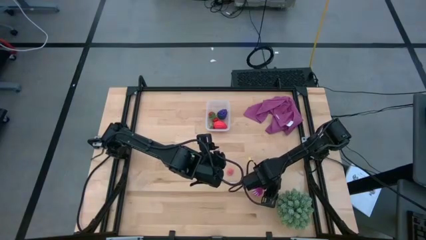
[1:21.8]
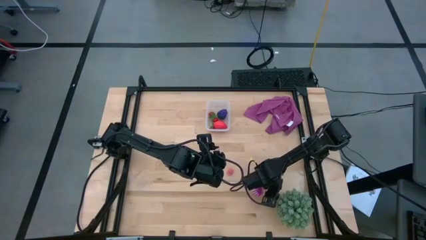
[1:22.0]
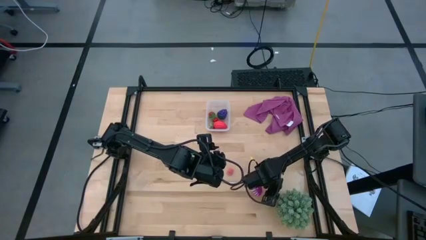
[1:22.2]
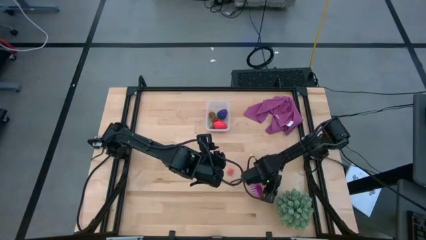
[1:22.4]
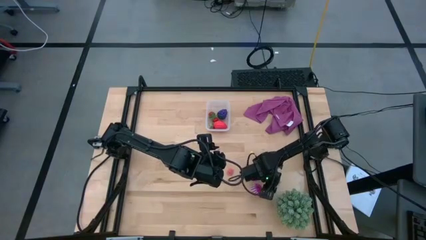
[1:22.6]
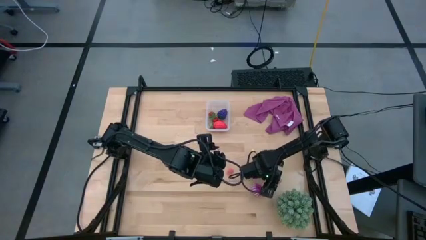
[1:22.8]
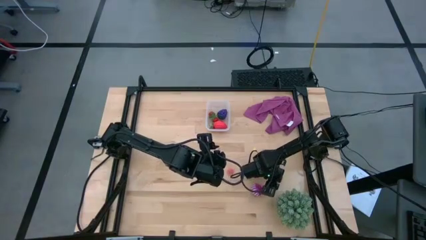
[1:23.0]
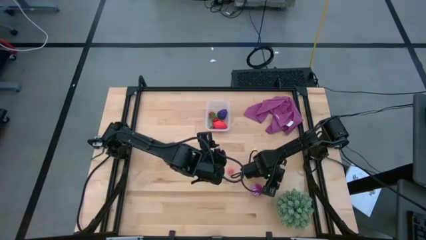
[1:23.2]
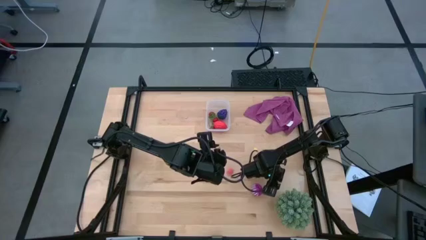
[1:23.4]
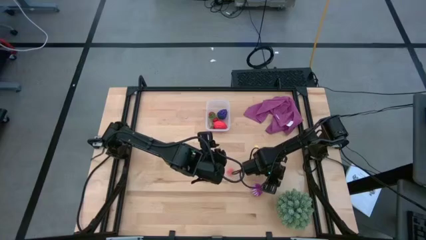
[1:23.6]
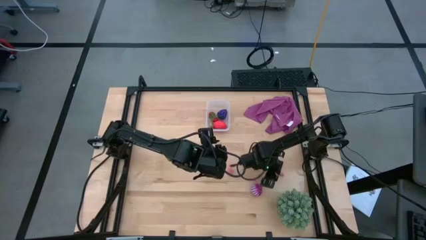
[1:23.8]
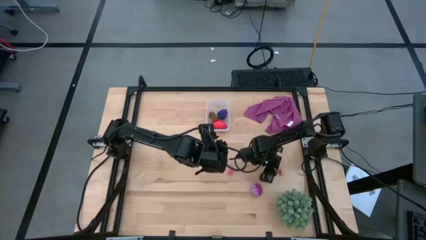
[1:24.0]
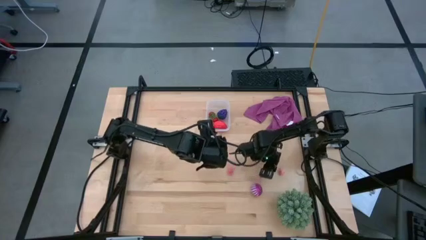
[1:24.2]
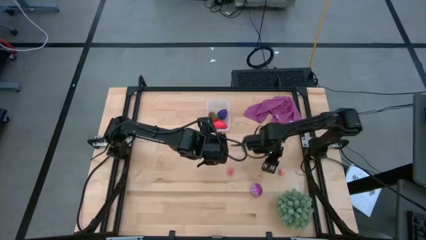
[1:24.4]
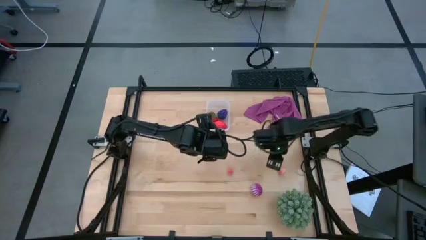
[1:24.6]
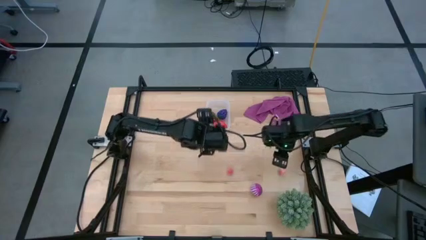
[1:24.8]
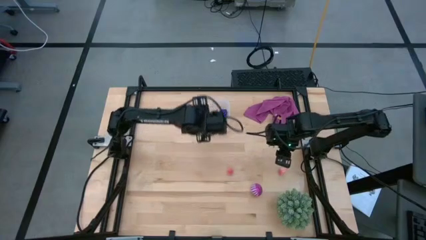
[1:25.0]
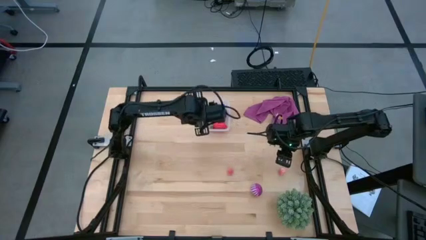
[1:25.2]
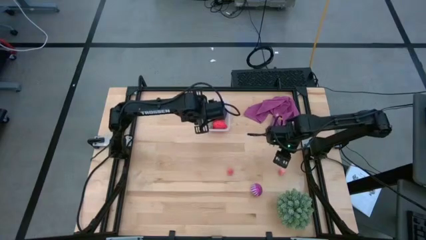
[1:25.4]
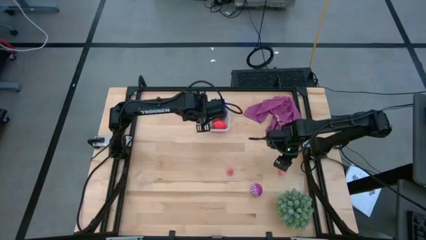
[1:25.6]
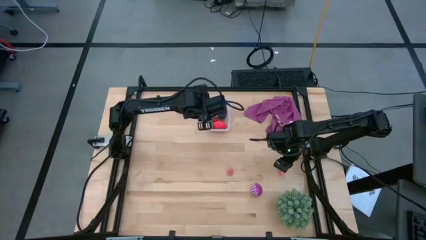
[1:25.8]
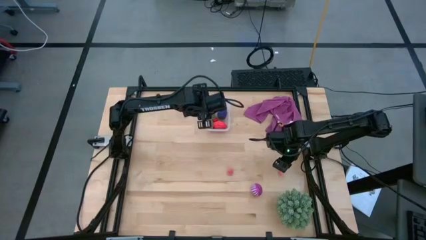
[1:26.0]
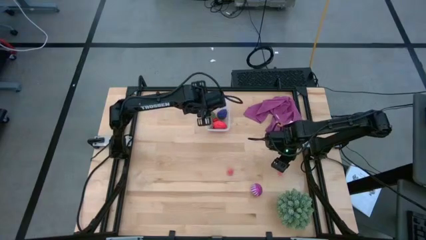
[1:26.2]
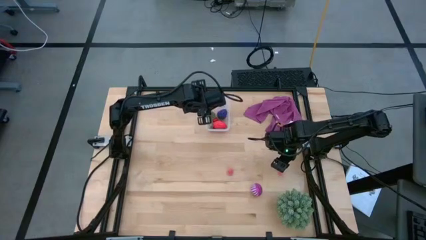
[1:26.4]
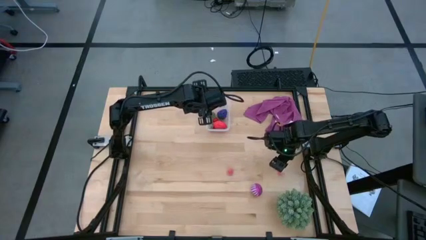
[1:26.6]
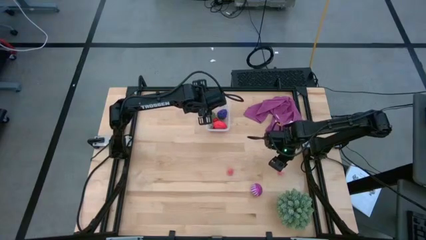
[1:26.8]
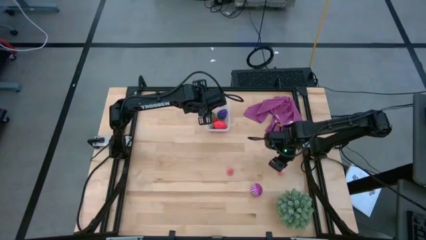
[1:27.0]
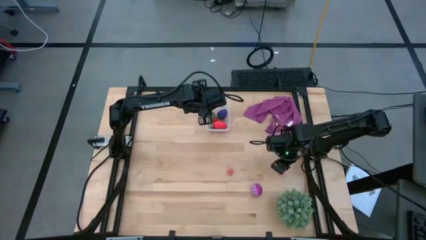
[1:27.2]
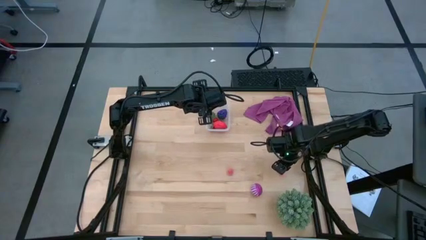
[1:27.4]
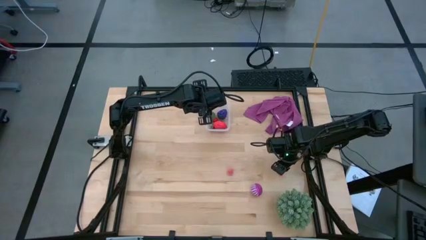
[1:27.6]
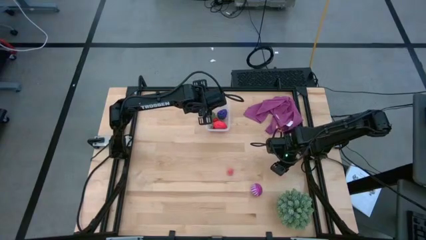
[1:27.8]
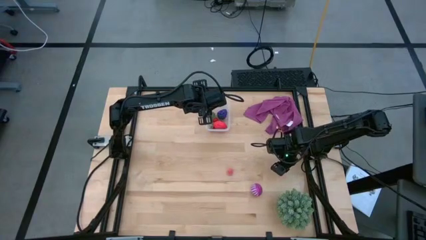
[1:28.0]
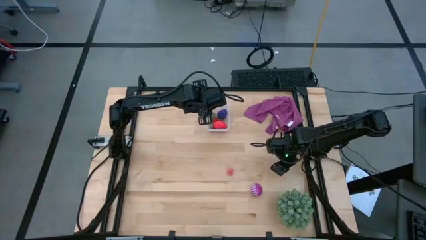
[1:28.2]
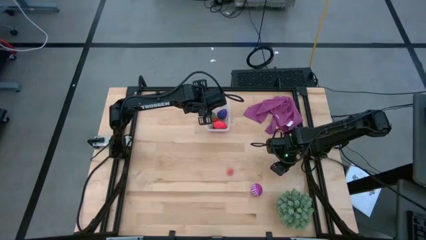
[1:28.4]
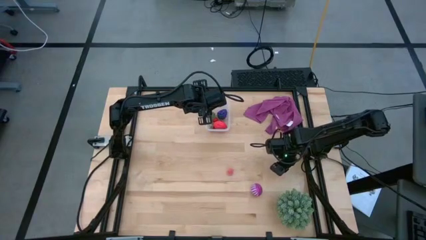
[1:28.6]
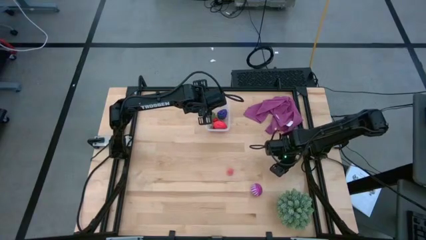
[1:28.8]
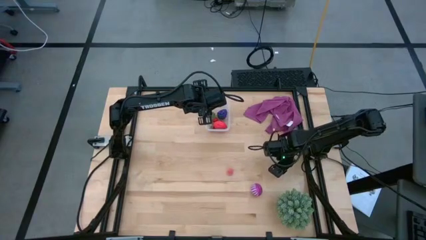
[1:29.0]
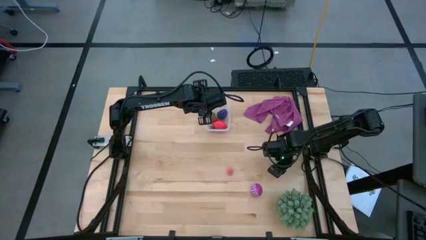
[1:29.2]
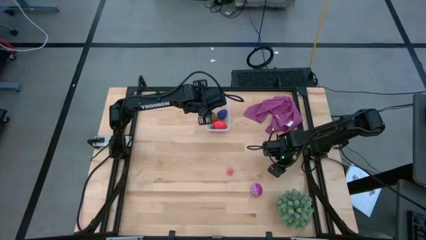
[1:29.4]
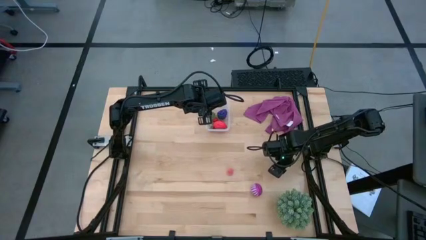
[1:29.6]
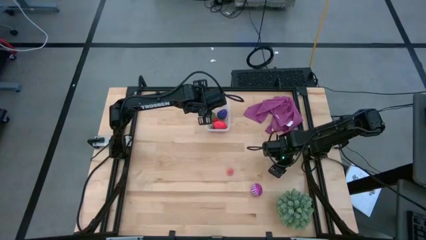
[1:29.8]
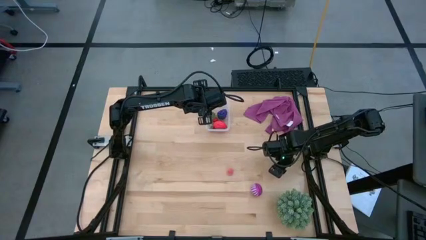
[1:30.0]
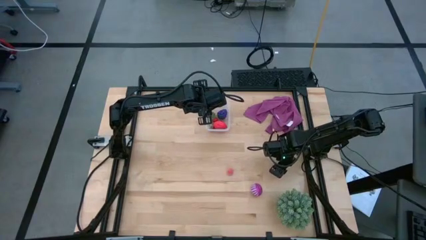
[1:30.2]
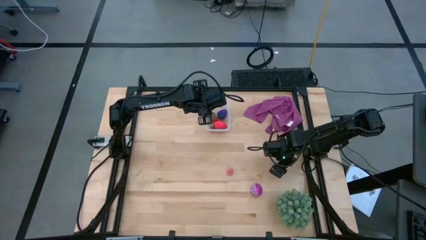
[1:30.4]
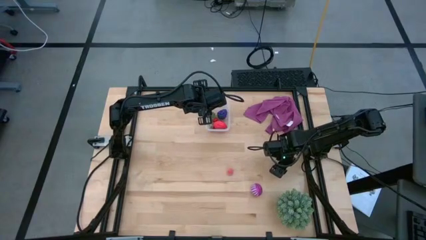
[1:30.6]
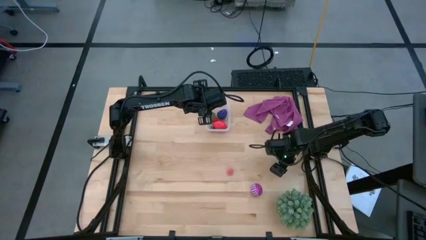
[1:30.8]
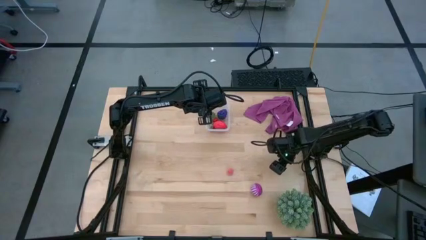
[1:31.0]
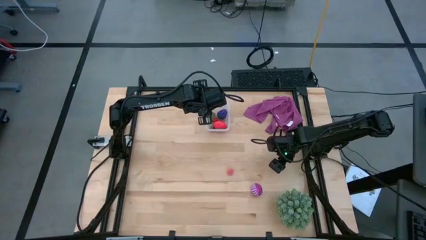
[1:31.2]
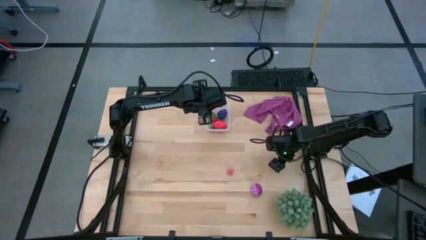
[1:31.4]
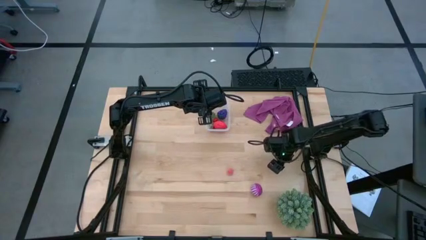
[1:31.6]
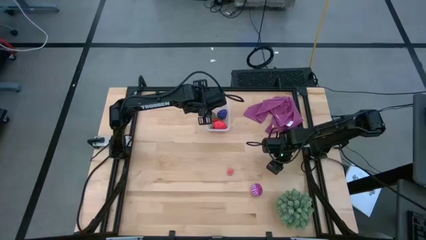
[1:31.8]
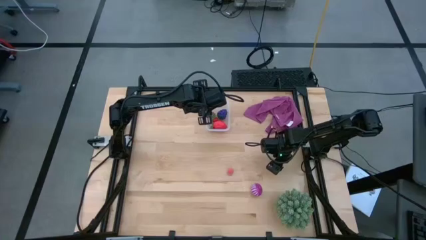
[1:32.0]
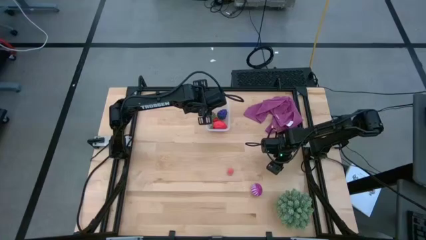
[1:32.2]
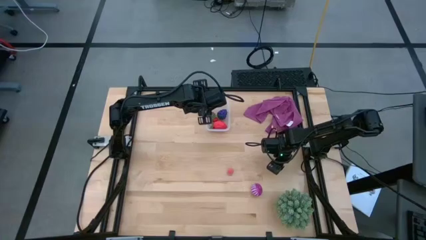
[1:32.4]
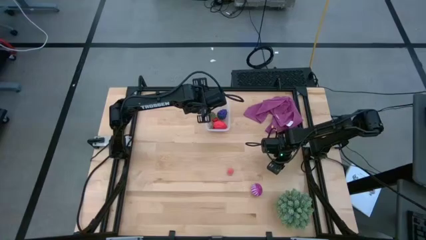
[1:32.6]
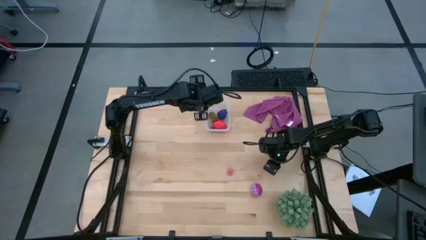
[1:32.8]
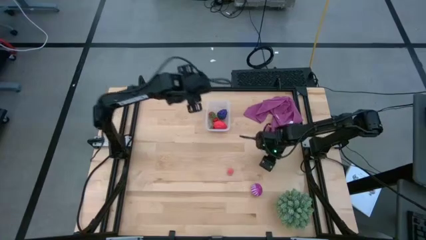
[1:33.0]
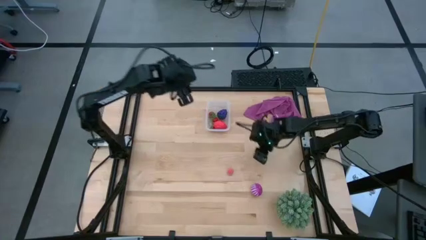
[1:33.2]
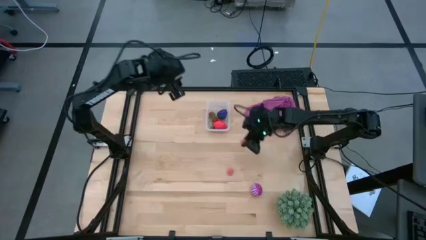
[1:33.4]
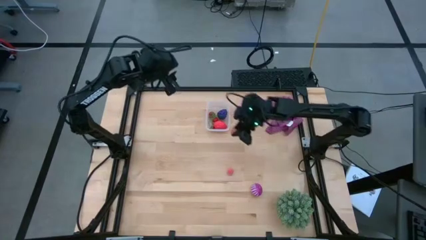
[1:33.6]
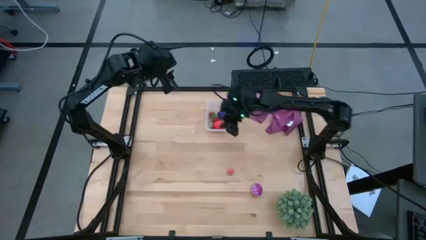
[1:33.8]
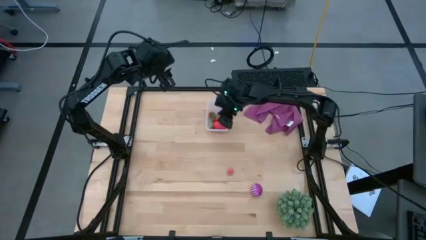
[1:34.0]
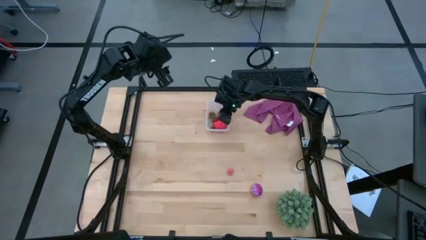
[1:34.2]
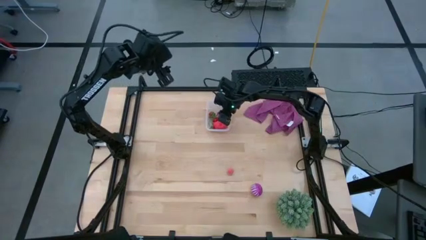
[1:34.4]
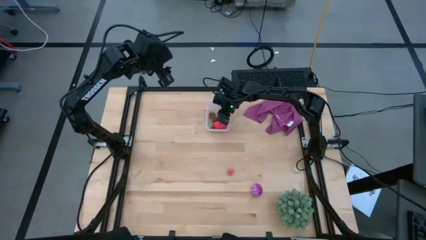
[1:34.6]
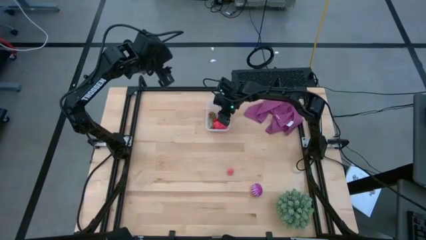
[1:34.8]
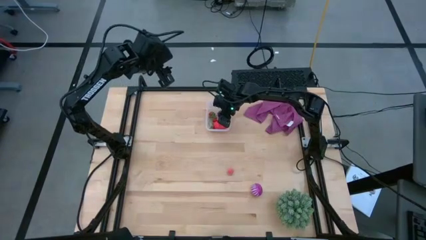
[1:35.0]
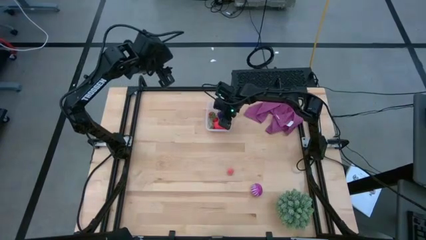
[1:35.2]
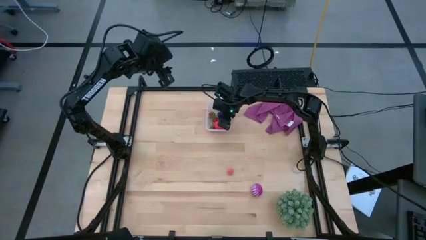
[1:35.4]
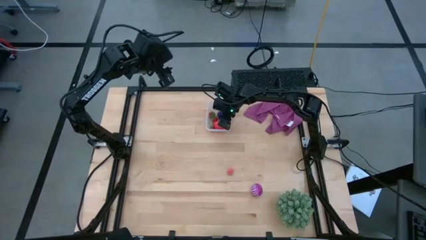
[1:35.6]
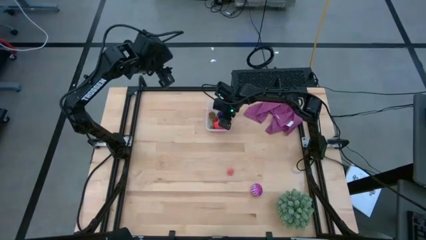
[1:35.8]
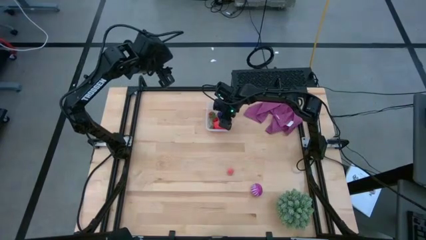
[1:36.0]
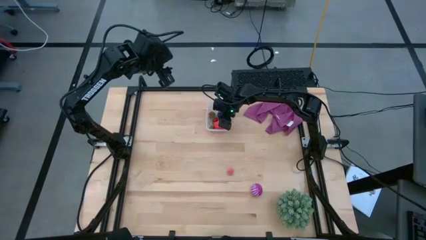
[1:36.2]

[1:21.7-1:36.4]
Task: Pick and placing Produce into tupperware
Put the bottom pink peach into the transparent bin

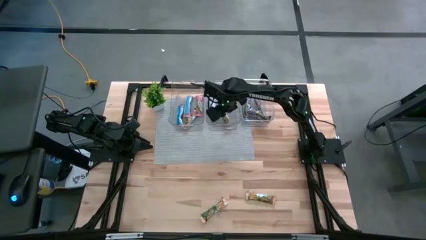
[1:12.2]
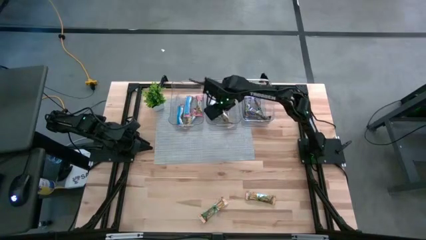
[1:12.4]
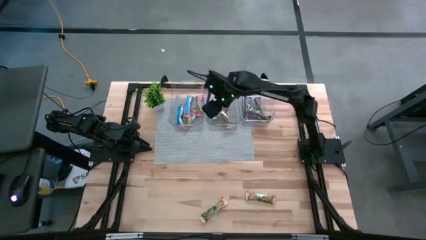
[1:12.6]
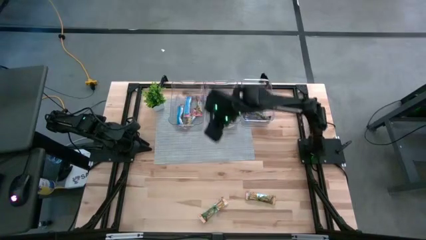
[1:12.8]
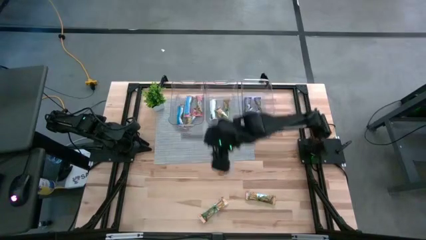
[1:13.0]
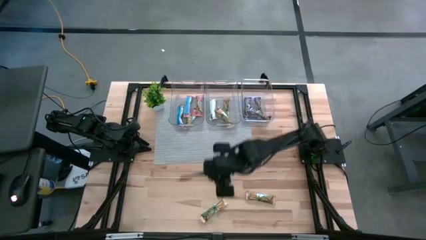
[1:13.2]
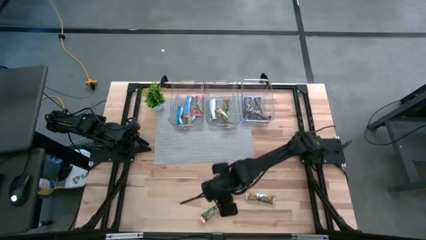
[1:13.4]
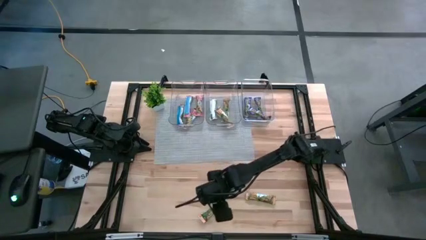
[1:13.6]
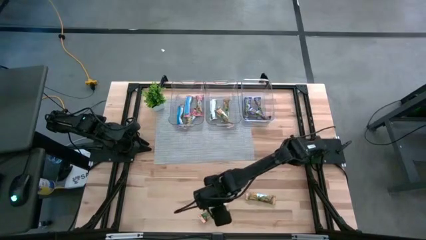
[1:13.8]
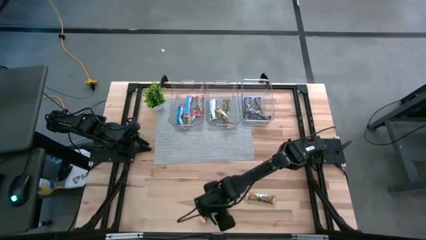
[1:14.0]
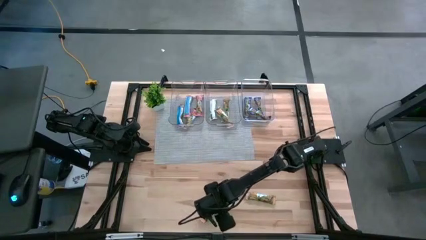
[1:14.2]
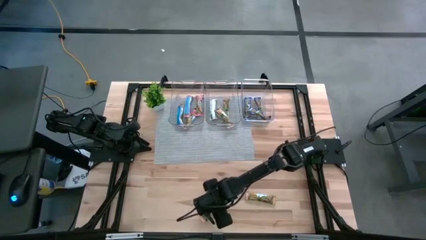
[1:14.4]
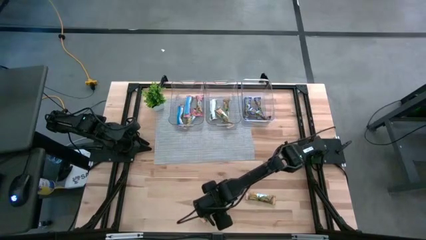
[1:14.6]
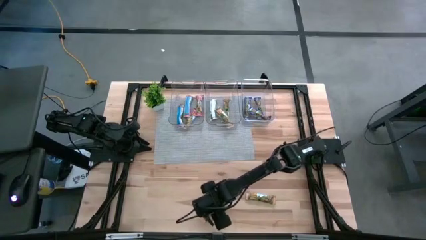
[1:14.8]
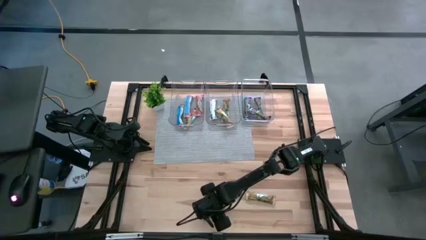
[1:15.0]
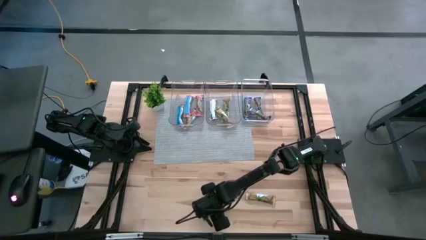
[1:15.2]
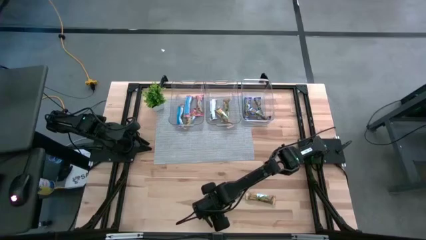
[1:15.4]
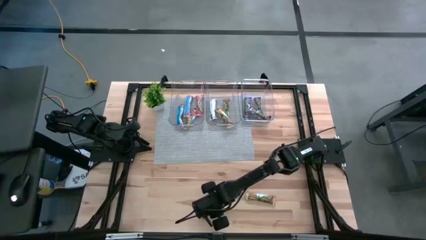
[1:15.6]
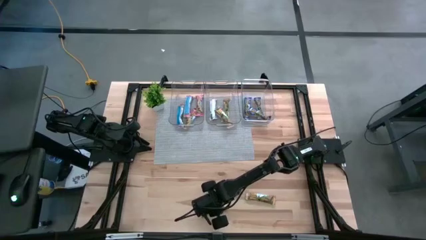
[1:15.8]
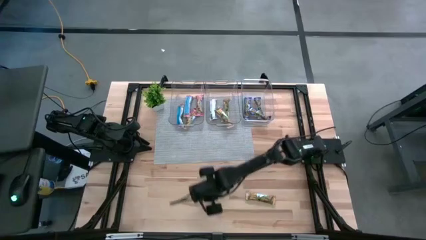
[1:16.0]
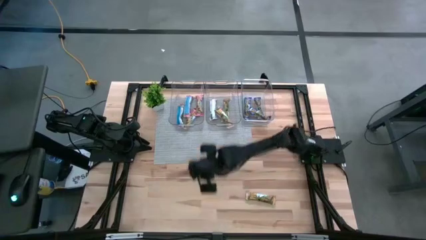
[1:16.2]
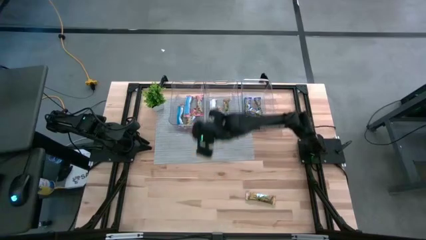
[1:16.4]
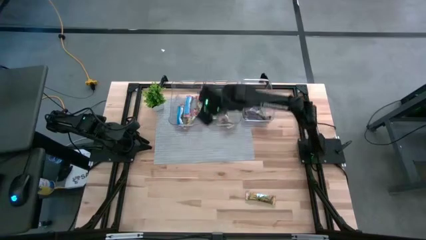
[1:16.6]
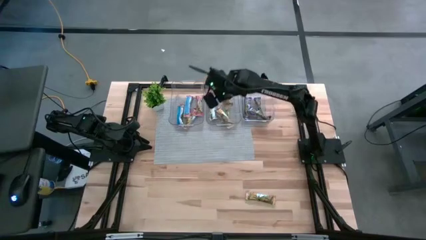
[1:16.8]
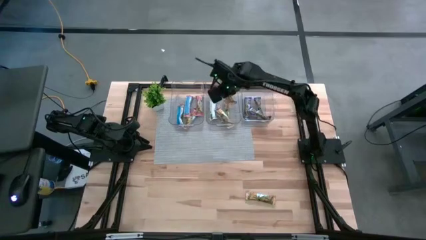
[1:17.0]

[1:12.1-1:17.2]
Task: Pick and place Granola Bars by type
Put the yellow granola bar into the middle transparent bin
